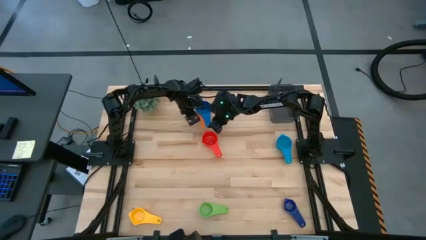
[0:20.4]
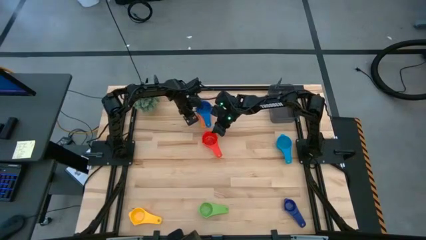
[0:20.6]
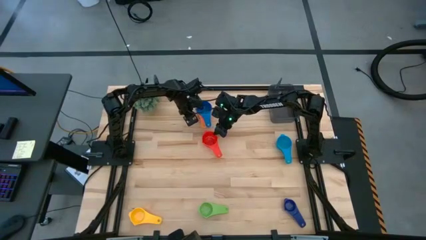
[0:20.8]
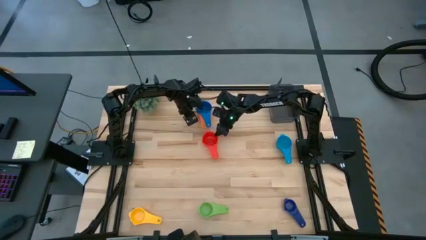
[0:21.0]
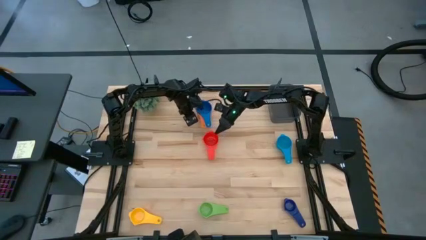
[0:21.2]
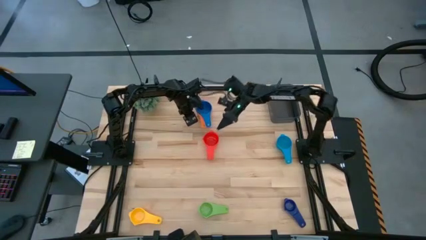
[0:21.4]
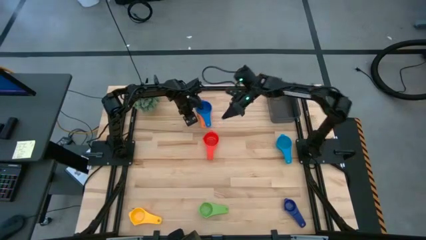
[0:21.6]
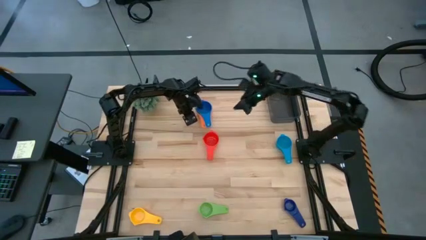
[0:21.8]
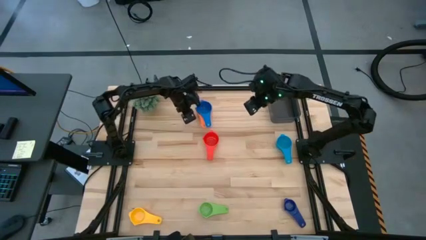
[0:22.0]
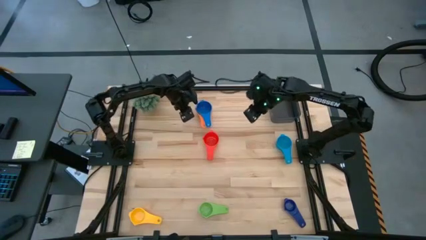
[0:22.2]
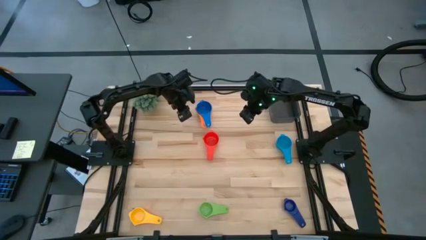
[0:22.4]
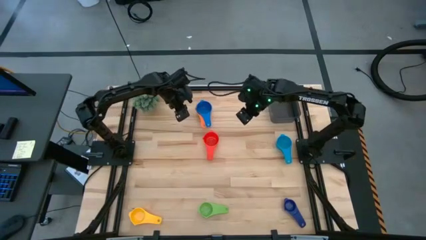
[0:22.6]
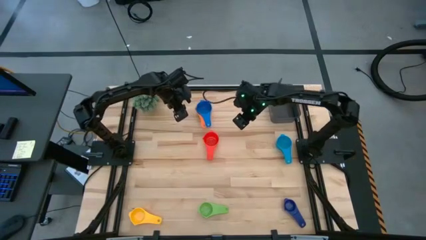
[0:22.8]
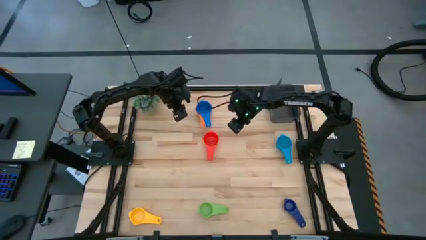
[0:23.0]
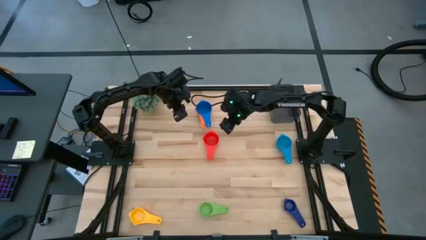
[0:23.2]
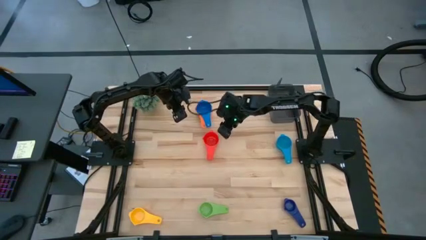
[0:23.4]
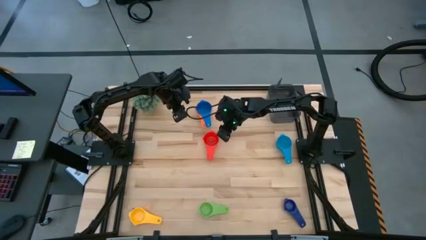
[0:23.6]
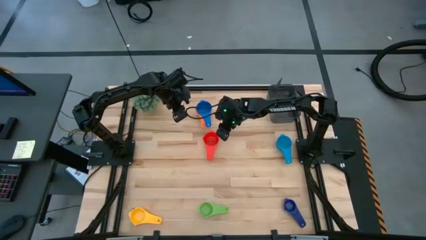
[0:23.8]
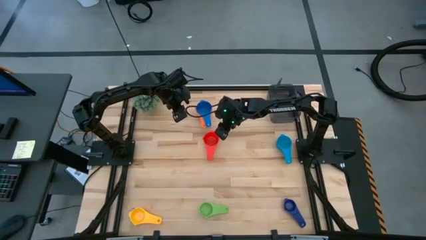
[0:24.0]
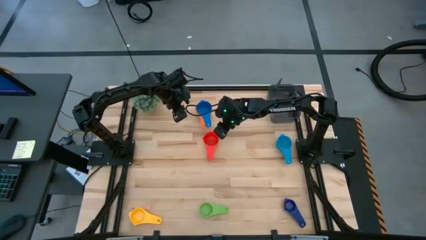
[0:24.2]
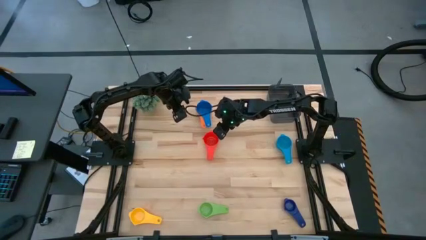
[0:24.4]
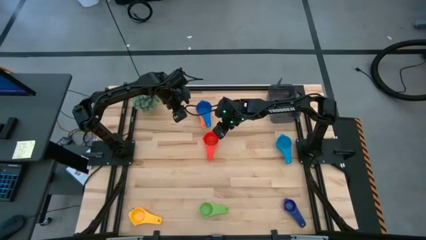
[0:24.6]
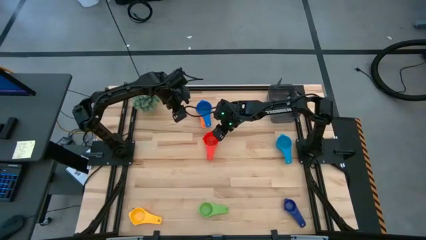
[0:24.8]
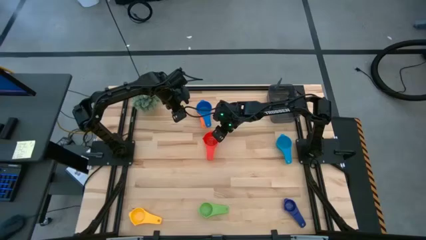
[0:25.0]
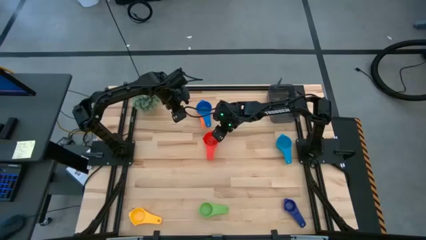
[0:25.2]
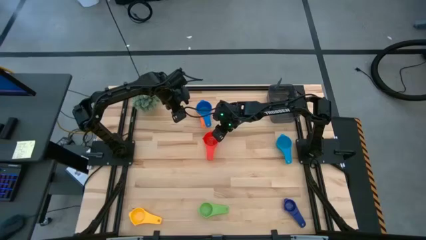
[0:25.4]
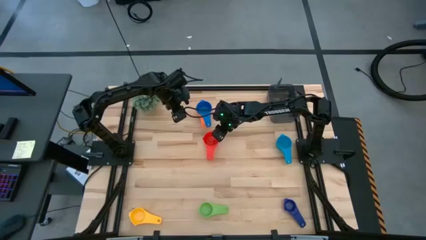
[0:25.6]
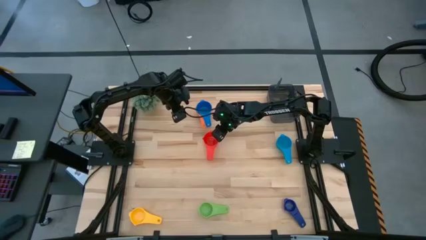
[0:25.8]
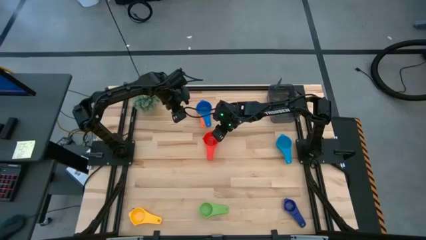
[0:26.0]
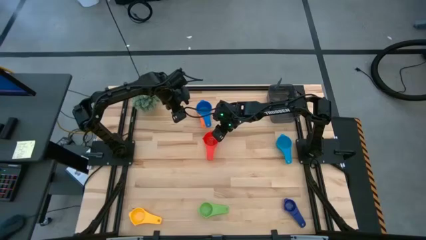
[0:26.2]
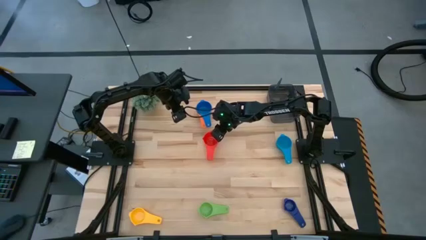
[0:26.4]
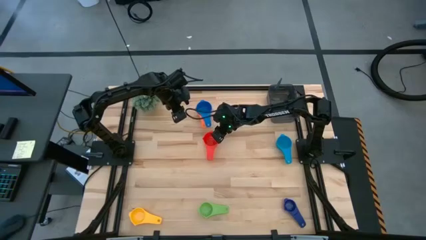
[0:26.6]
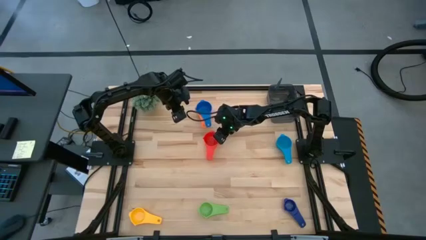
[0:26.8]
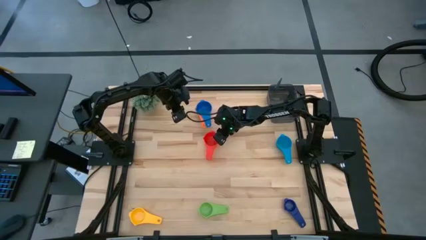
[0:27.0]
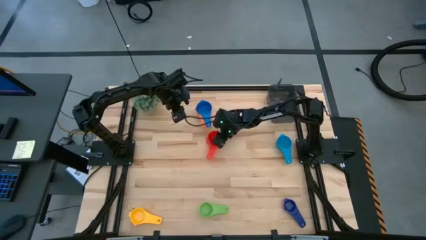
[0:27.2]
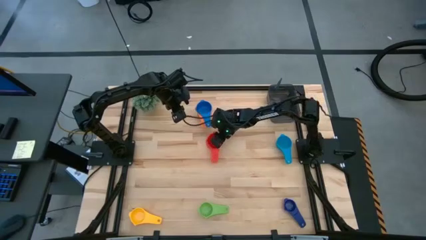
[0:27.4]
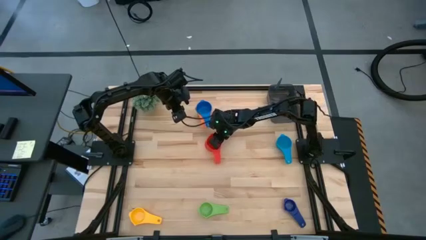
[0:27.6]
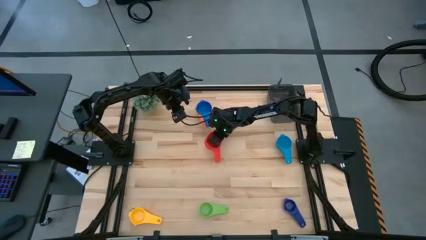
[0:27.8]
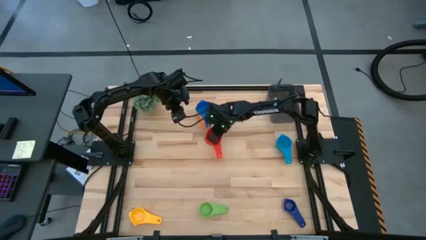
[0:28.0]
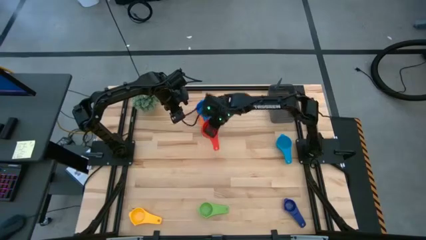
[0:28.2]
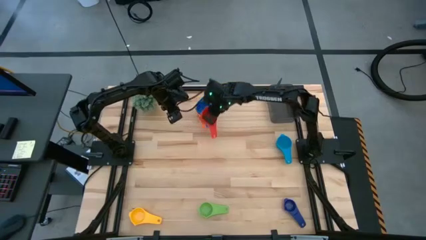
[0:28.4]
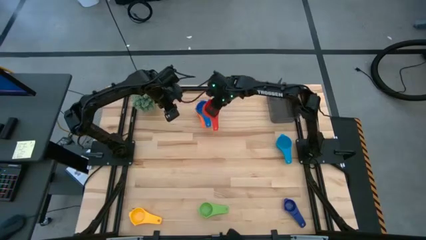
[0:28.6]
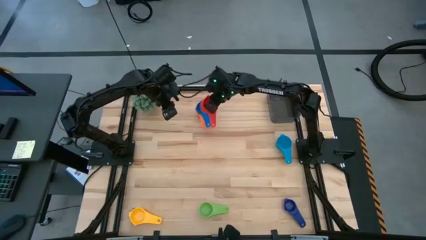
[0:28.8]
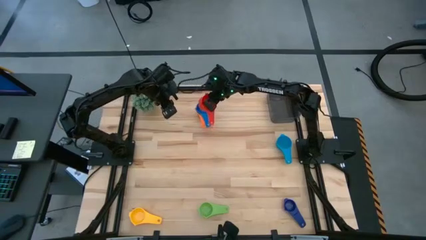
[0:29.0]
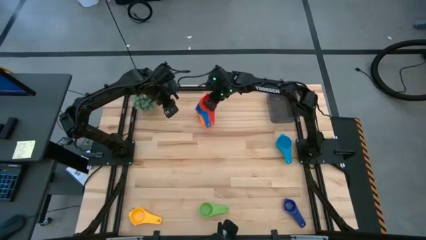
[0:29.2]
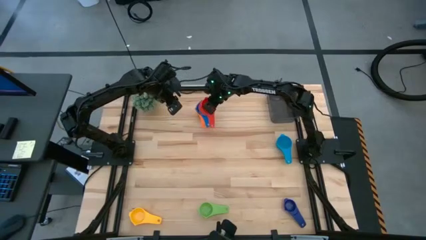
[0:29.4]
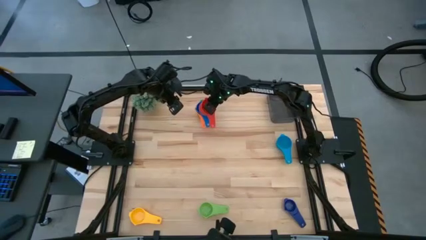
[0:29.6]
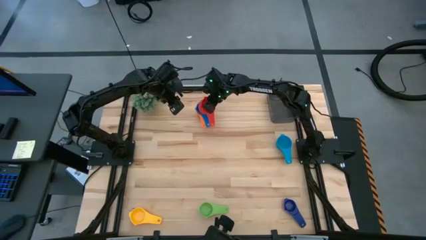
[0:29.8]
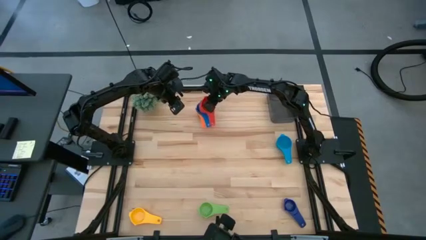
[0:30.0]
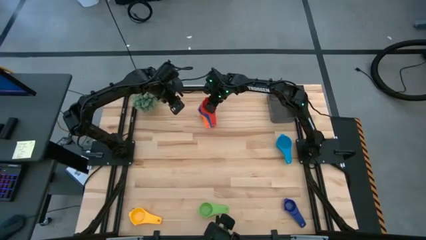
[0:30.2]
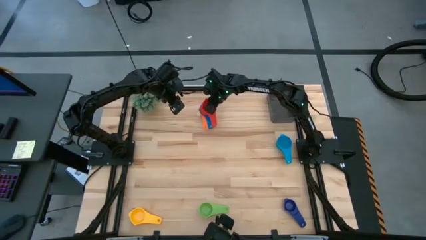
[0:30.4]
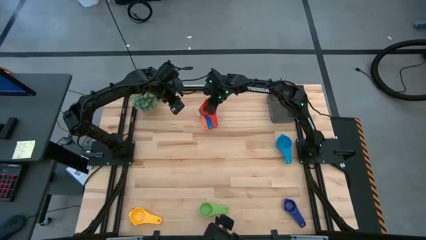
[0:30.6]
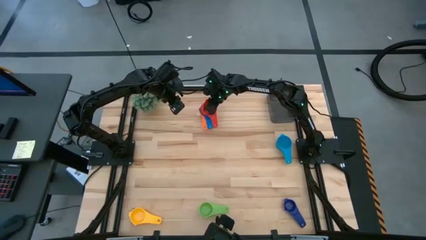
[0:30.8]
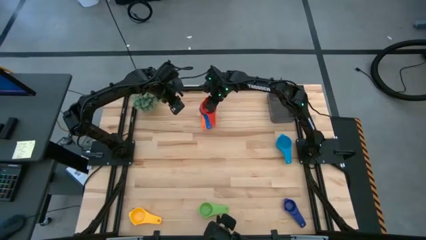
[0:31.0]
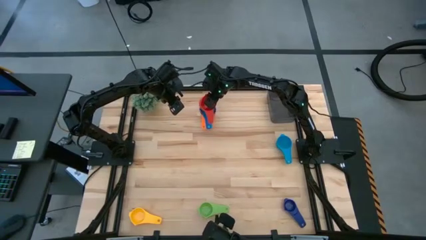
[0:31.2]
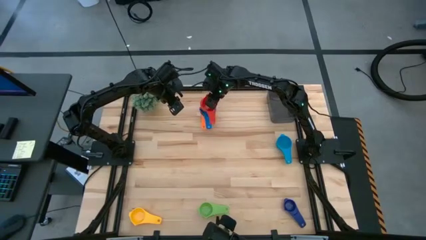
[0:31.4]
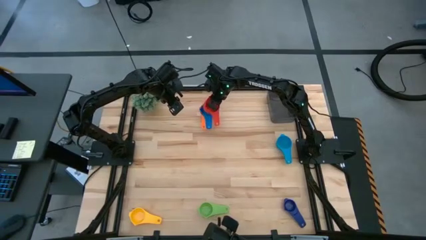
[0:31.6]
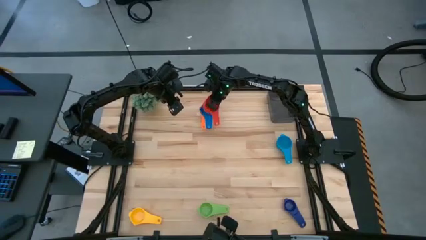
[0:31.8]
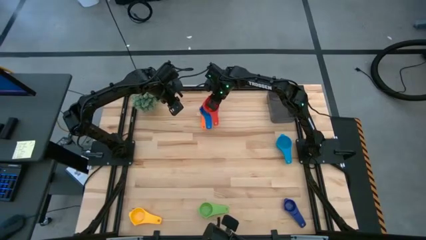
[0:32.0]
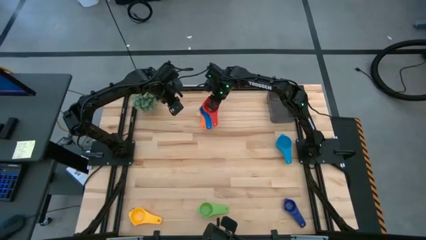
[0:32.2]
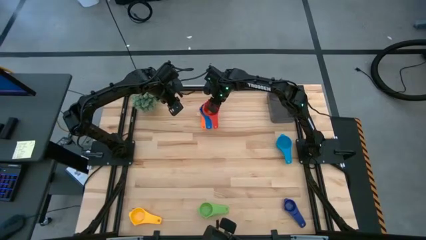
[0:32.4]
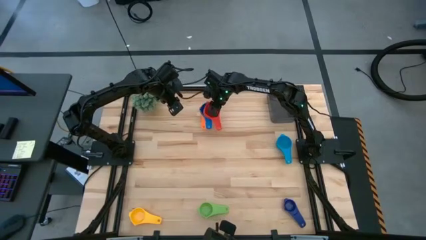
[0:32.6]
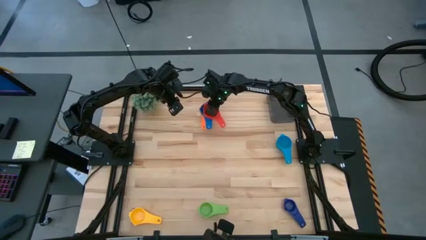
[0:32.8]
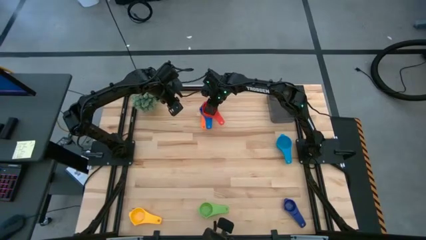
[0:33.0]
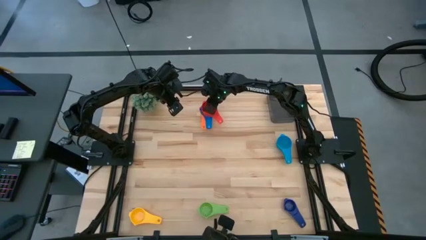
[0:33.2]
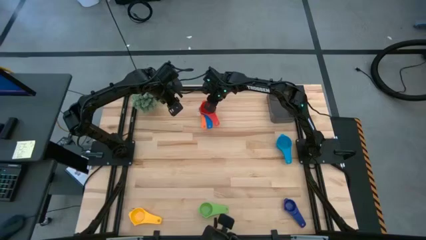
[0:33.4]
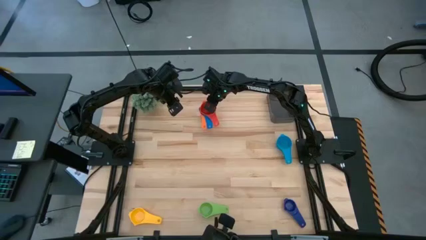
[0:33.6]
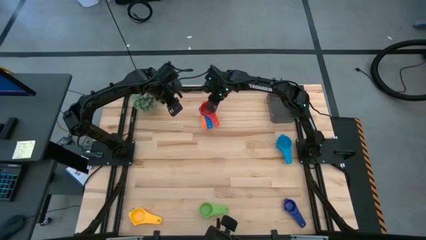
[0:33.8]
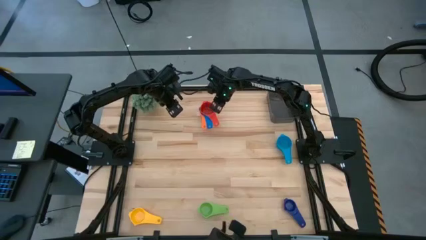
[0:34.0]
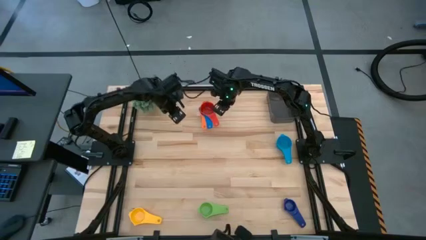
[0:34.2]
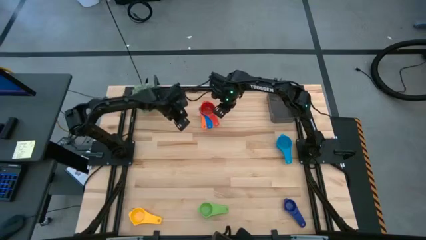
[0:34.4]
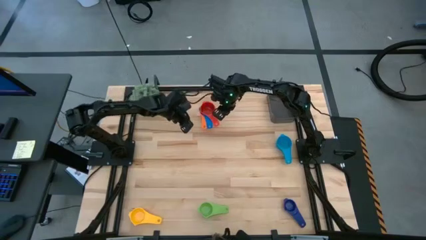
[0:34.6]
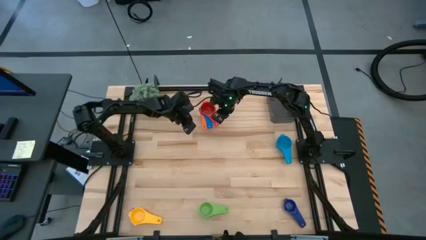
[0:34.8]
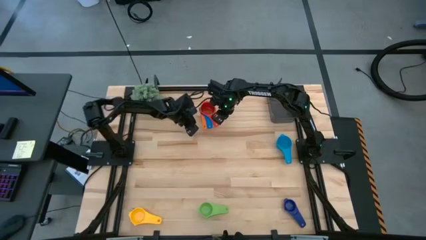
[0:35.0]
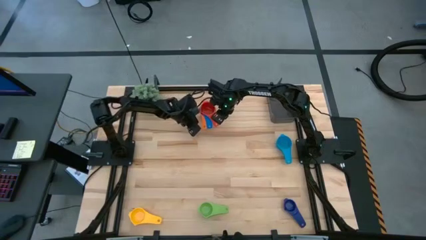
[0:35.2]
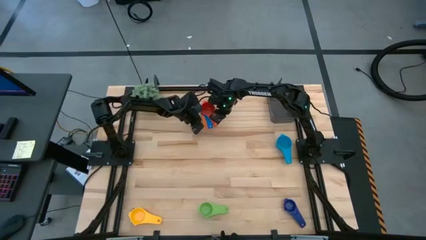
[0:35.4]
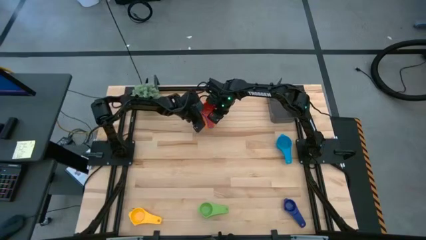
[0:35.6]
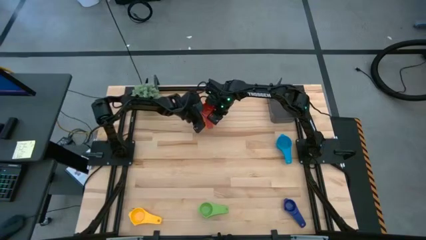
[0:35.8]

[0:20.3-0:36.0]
Task: Nest measuring cups in basket
Stack the red measuring cup on top of the blue measuring cup

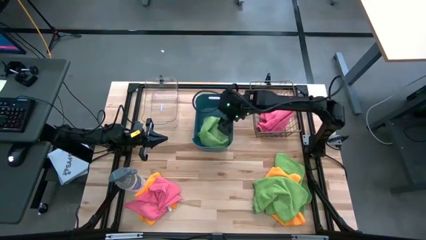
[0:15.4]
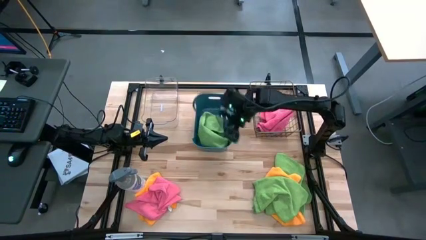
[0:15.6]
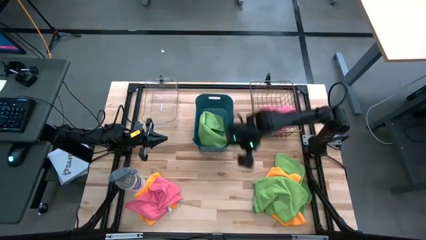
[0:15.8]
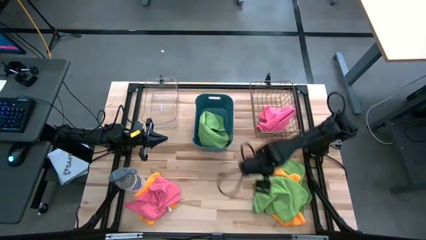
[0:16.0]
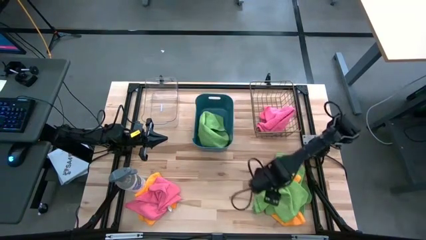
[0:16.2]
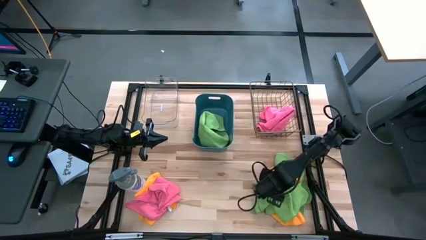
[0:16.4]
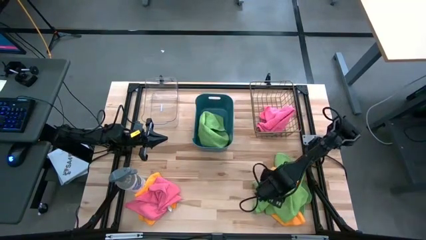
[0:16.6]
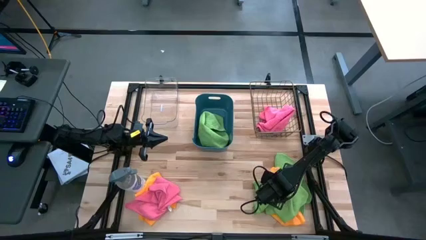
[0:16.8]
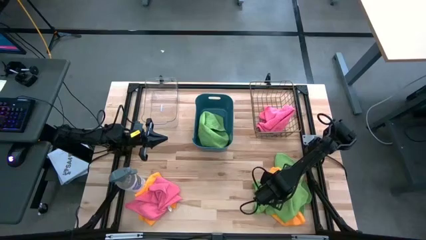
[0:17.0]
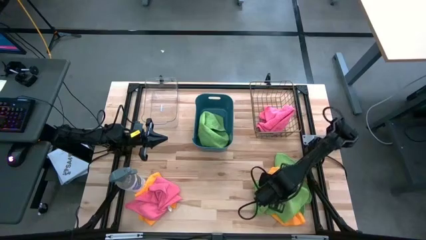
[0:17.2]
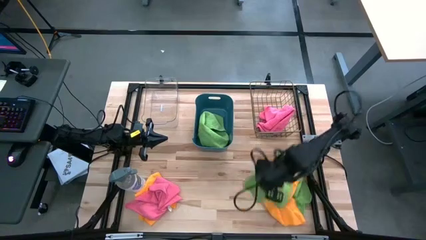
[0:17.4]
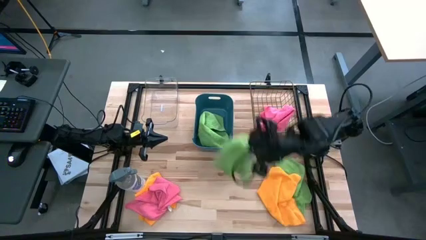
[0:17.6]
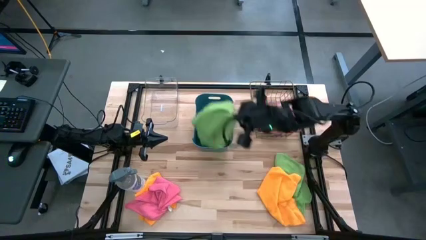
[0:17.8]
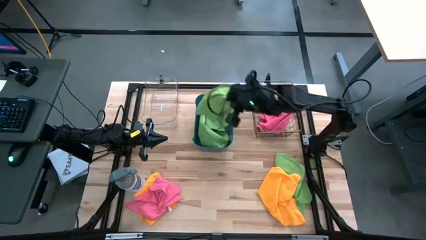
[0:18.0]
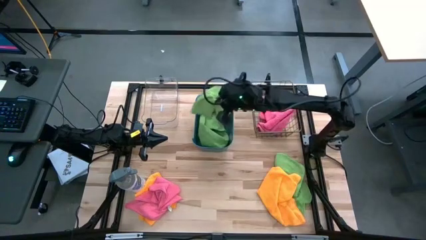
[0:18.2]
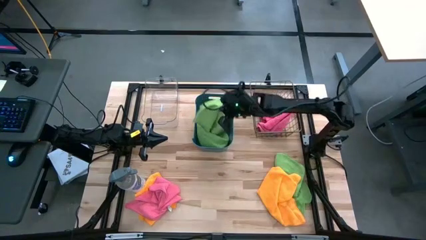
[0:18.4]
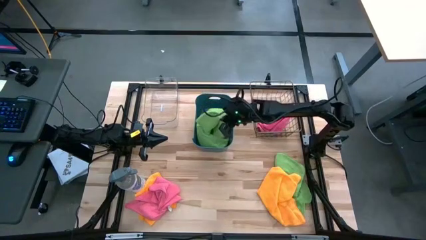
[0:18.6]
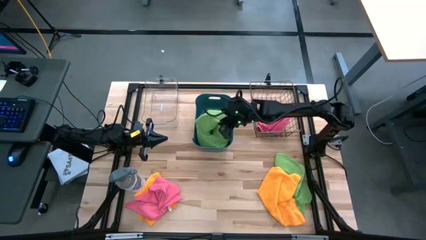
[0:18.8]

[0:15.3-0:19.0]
Task: Sort microfiber towel by color & place in baskets
Put the bottom green microfiber cloth into the blue bin
